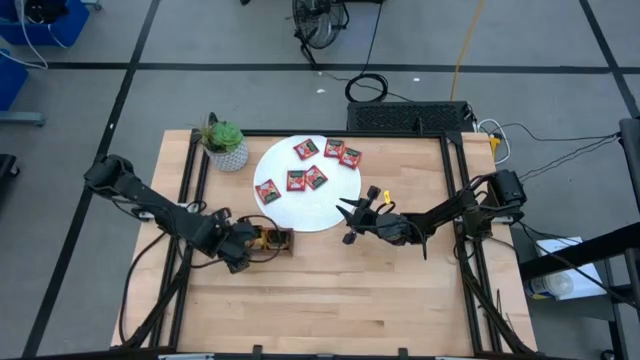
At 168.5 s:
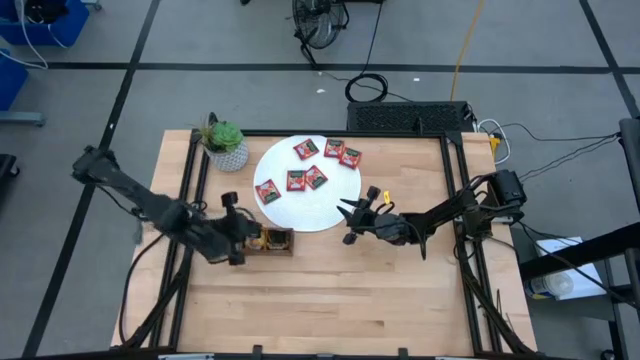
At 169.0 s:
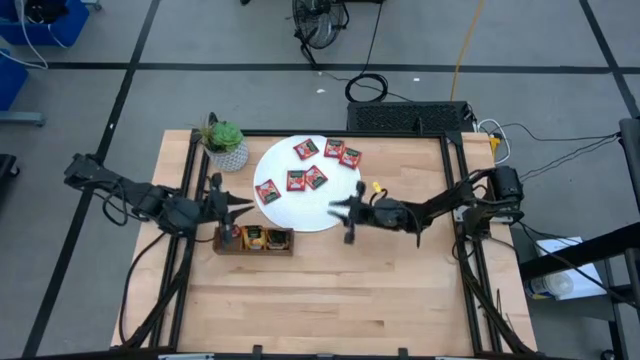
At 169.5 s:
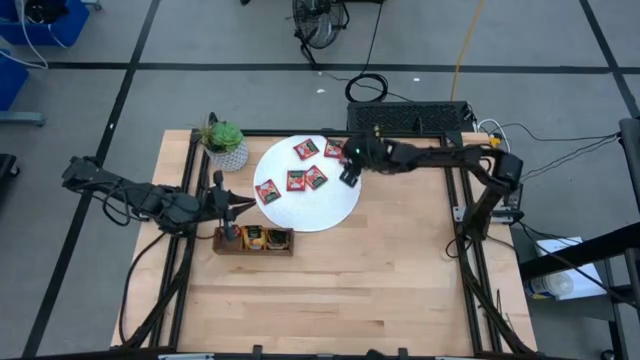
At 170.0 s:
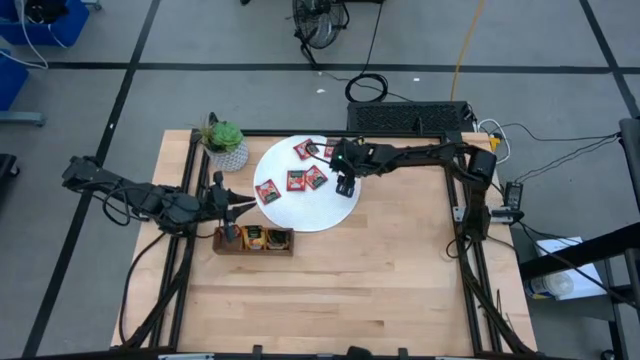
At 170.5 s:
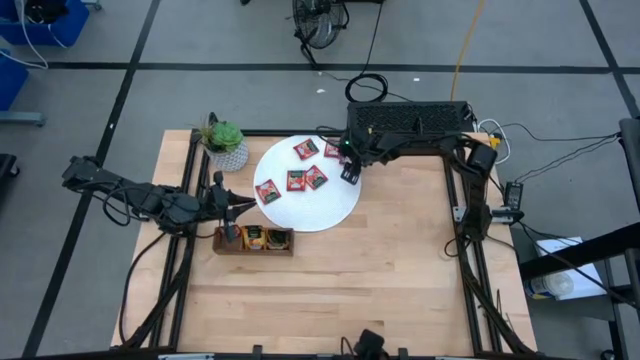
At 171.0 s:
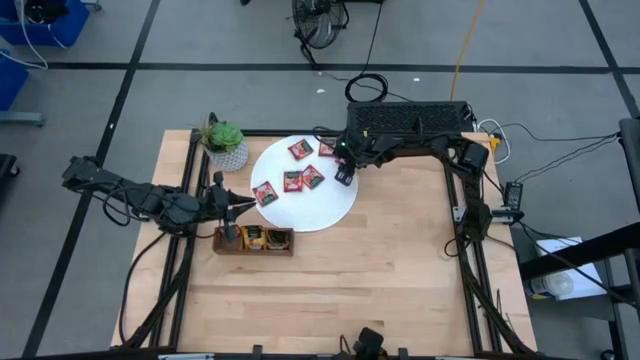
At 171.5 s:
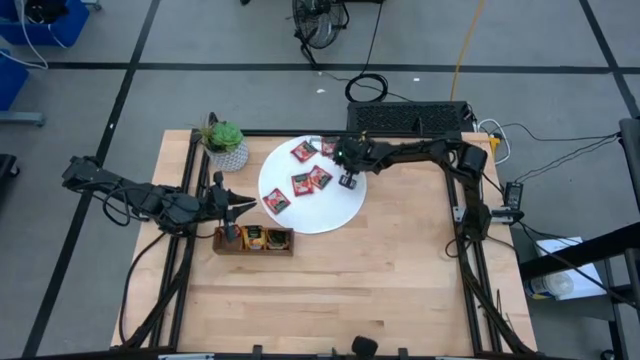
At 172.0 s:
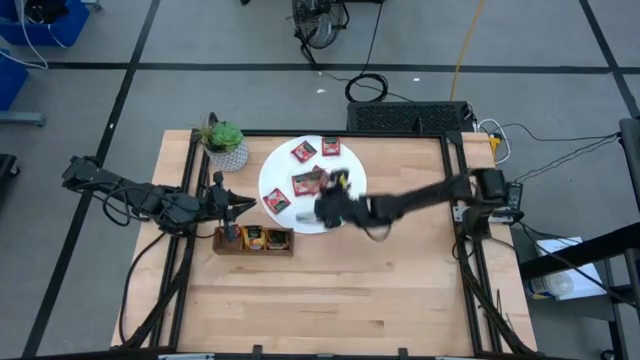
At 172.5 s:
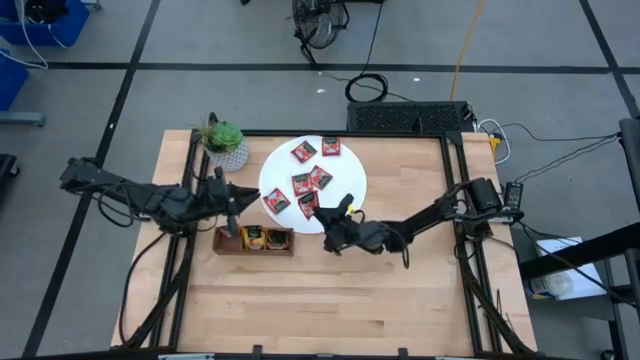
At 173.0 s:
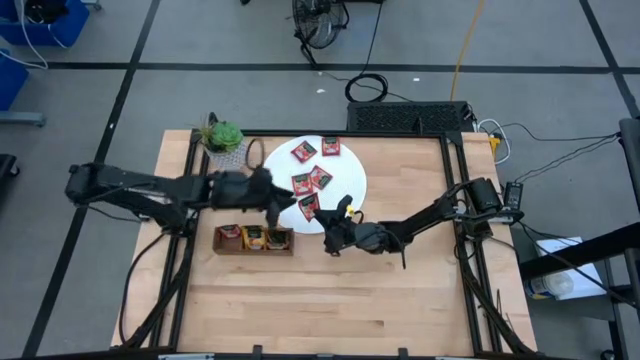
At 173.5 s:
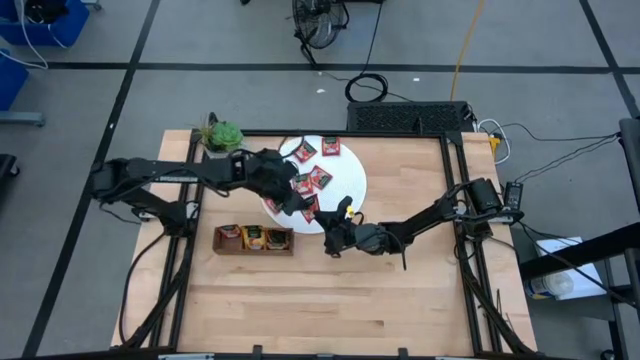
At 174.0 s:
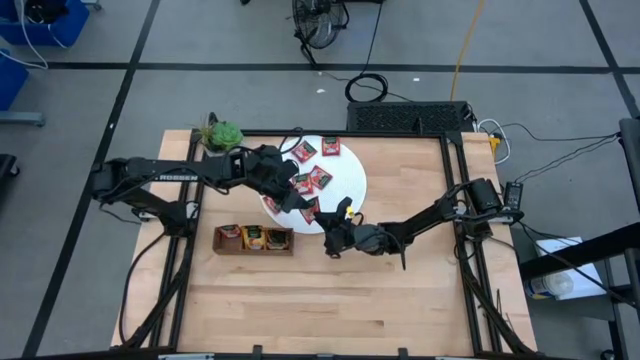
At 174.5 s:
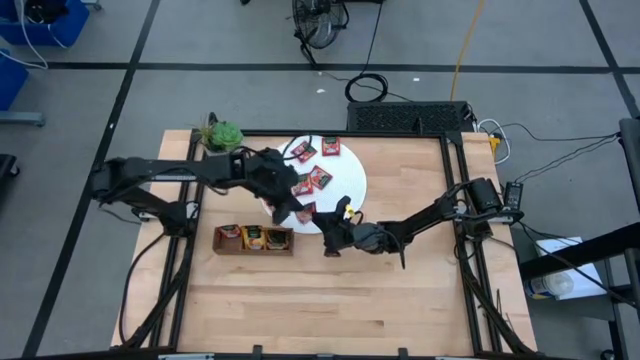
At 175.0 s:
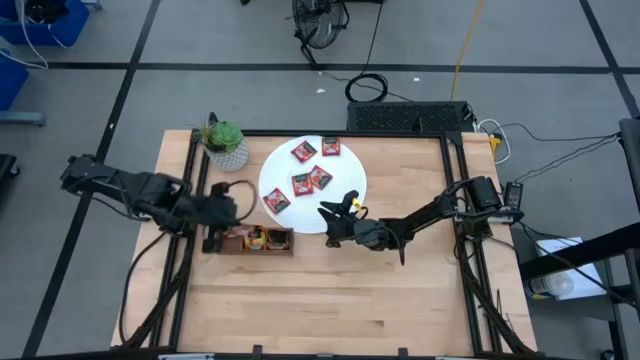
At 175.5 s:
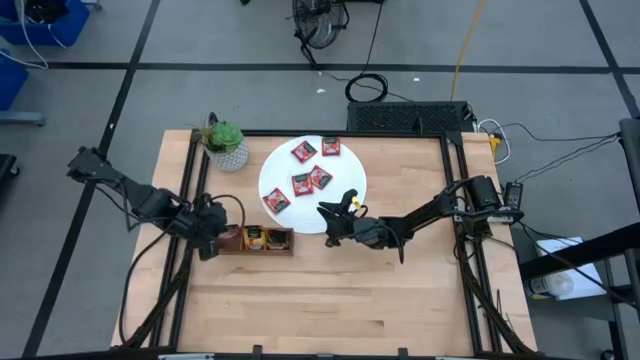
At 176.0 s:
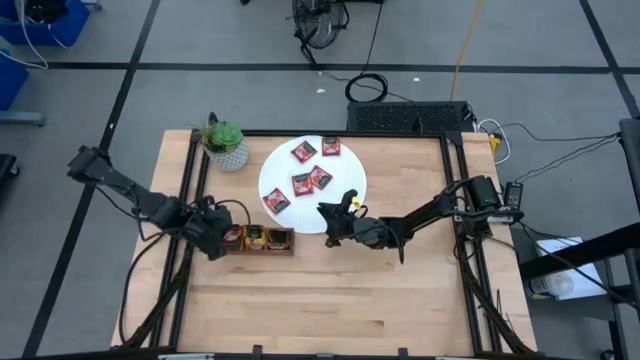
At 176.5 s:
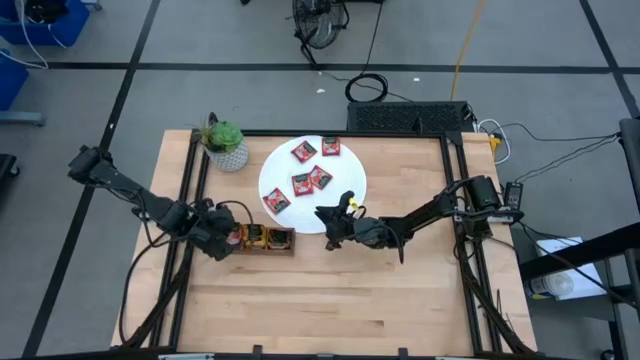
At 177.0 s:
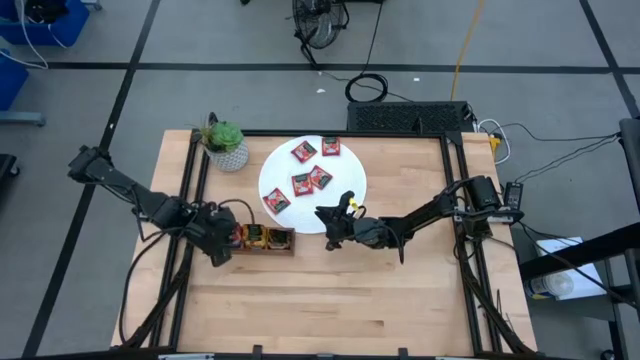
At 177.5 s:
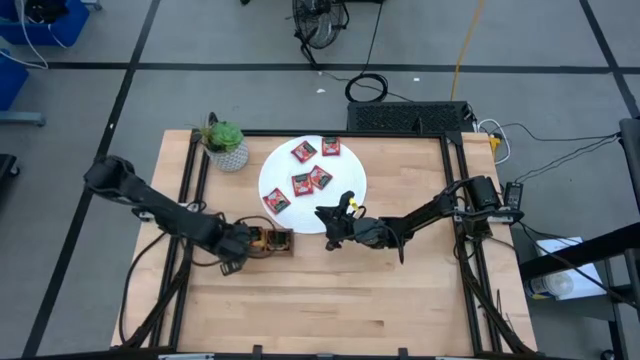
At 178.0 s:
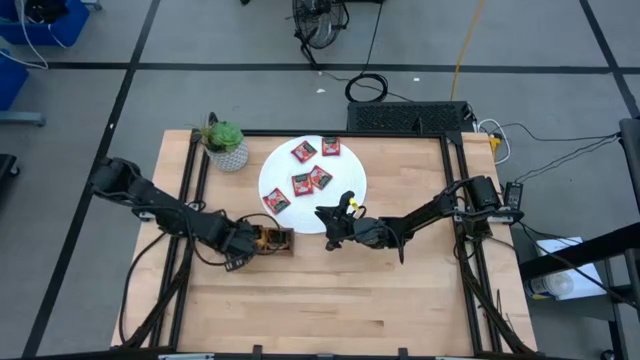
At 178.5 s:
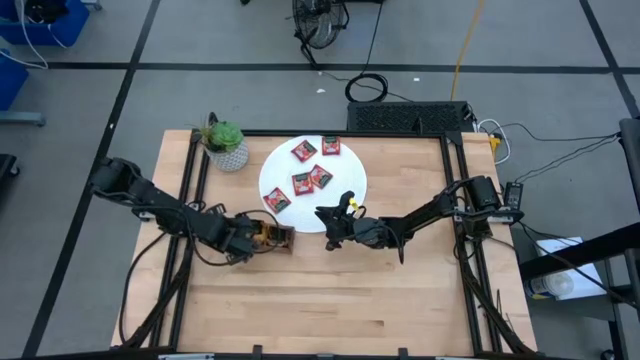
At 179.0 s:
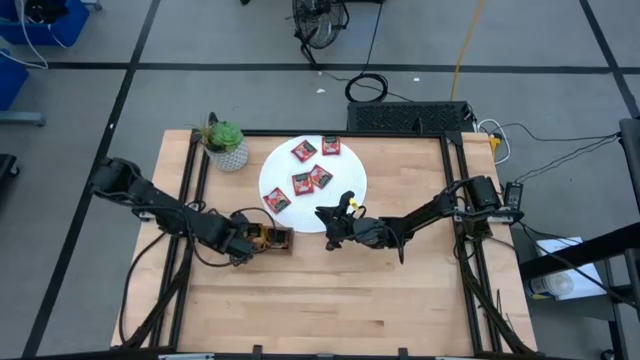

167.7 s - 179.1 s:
Task: Pick & Place Tea
Put the red tea bag into the left section of the wooden organizer

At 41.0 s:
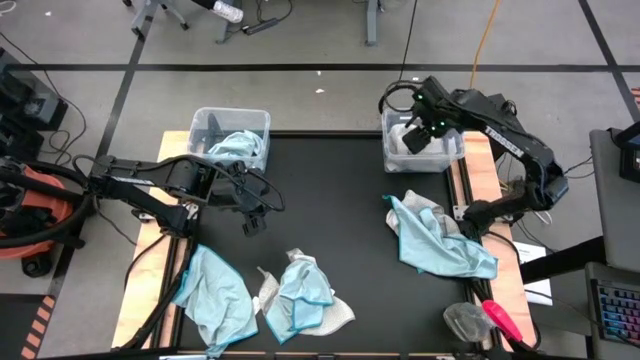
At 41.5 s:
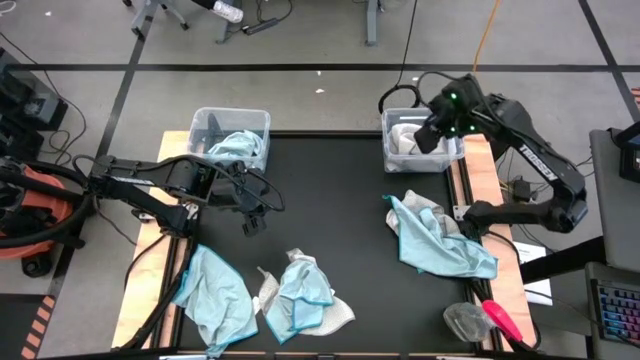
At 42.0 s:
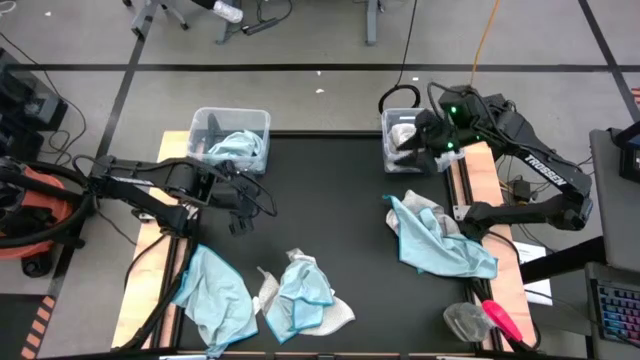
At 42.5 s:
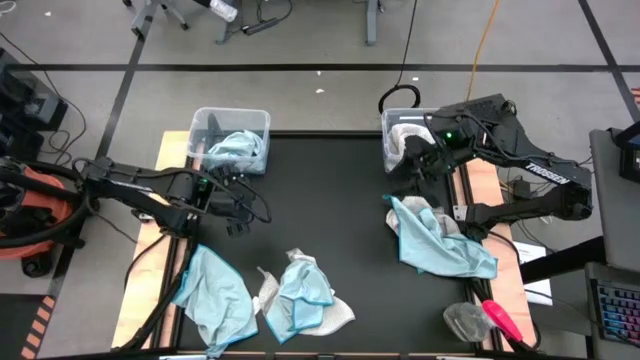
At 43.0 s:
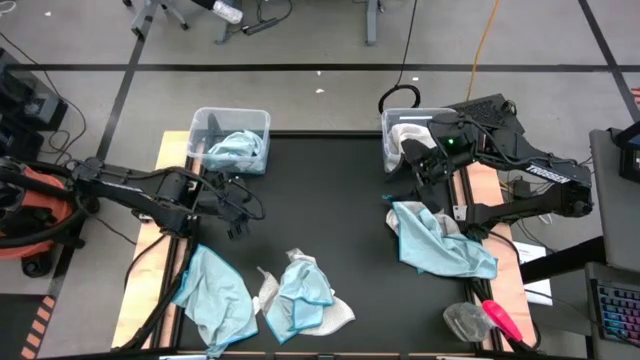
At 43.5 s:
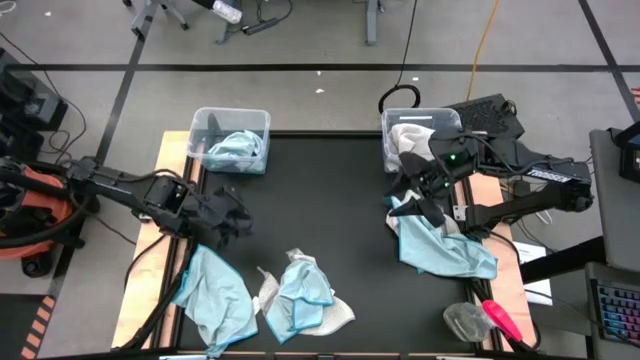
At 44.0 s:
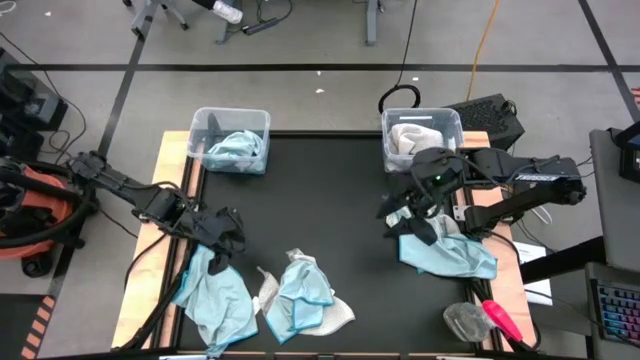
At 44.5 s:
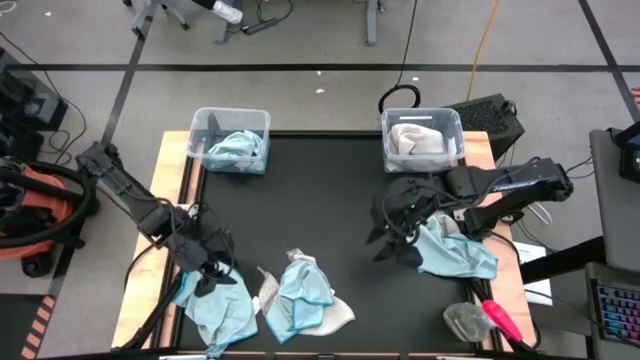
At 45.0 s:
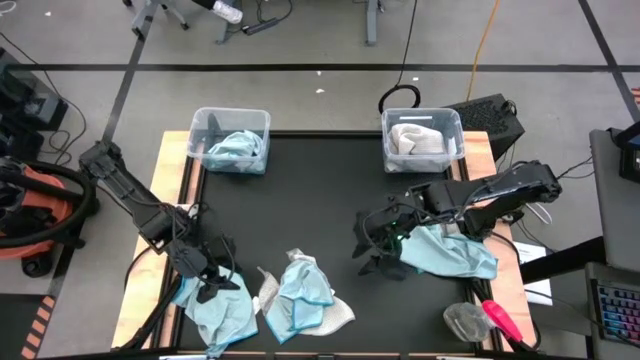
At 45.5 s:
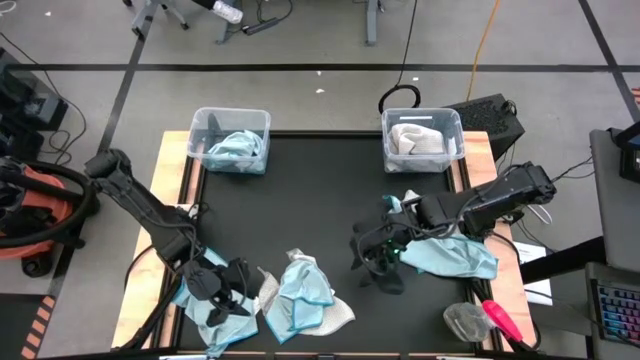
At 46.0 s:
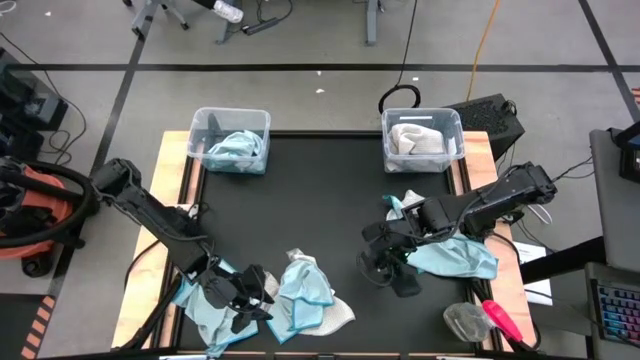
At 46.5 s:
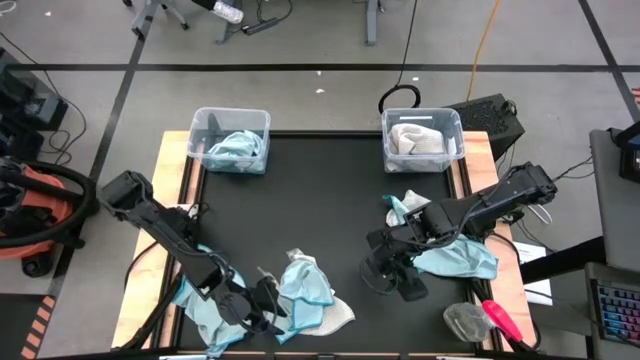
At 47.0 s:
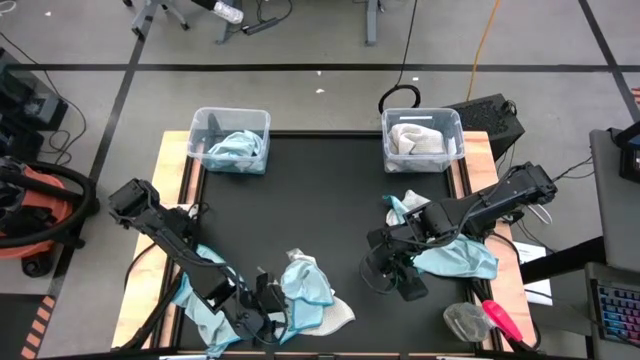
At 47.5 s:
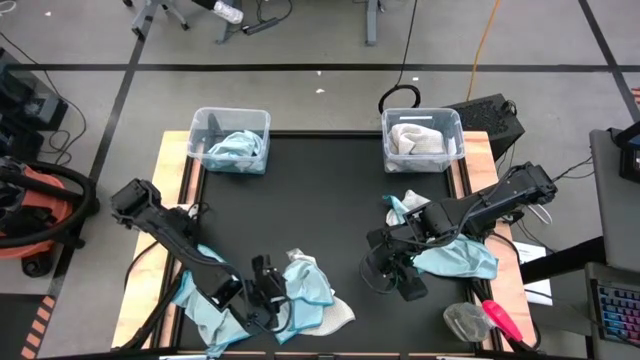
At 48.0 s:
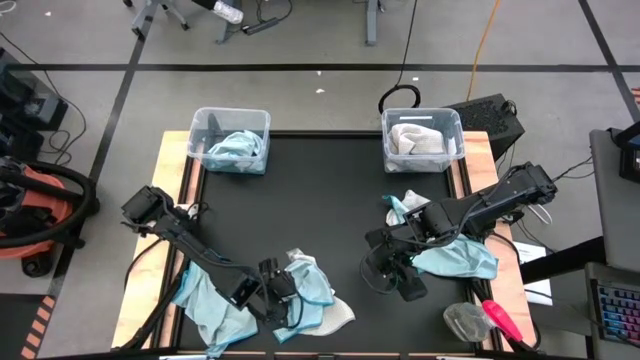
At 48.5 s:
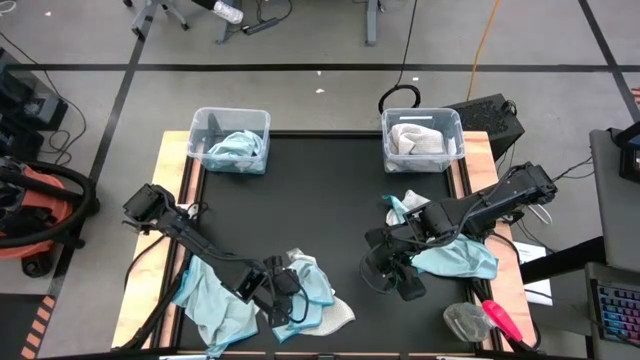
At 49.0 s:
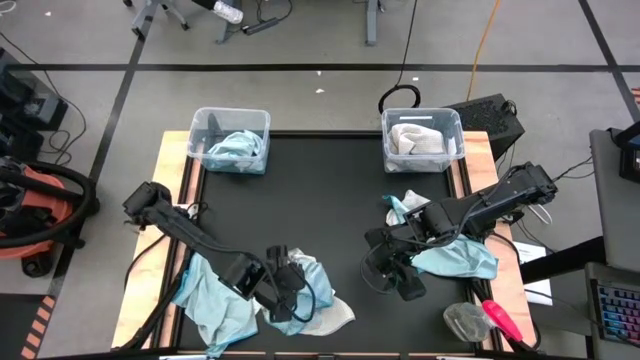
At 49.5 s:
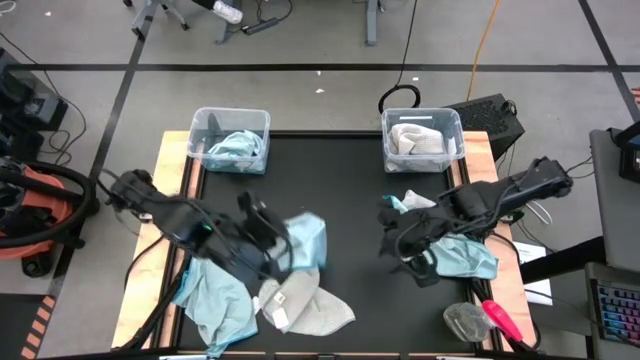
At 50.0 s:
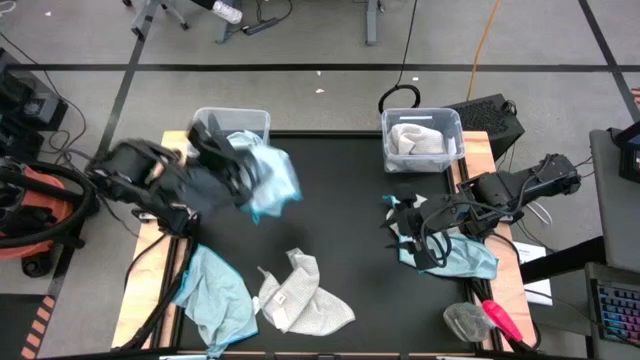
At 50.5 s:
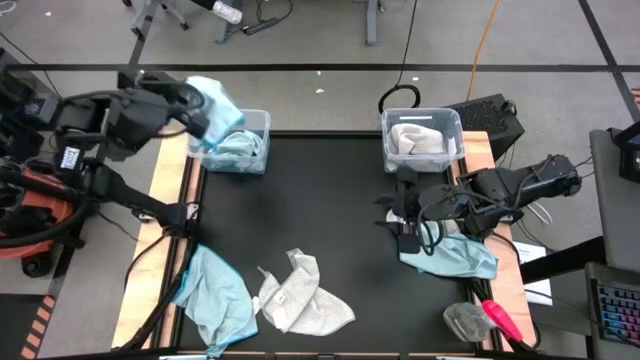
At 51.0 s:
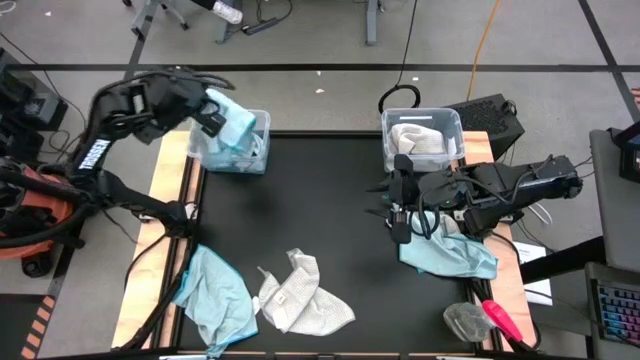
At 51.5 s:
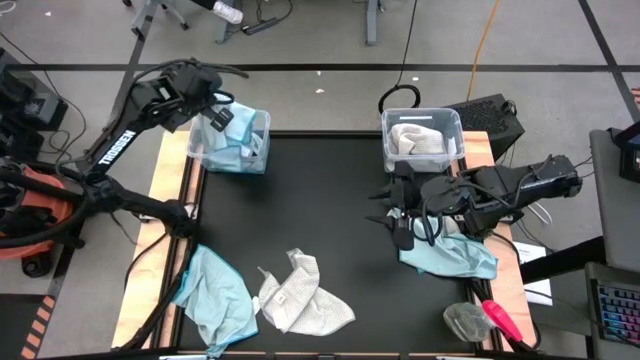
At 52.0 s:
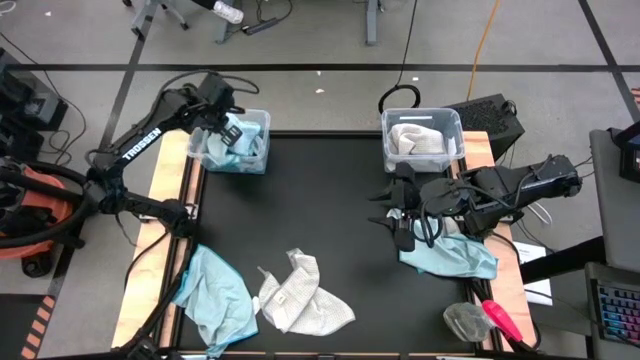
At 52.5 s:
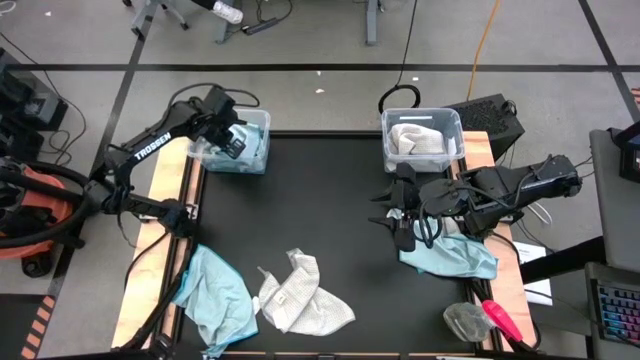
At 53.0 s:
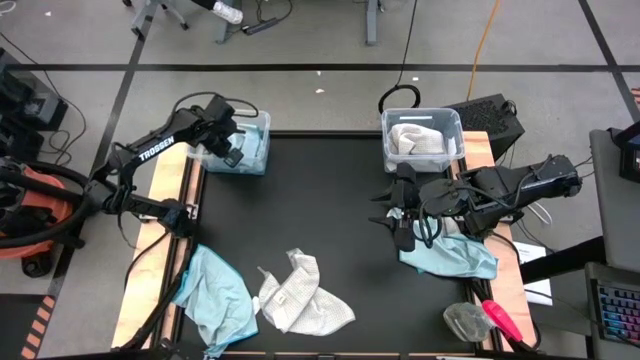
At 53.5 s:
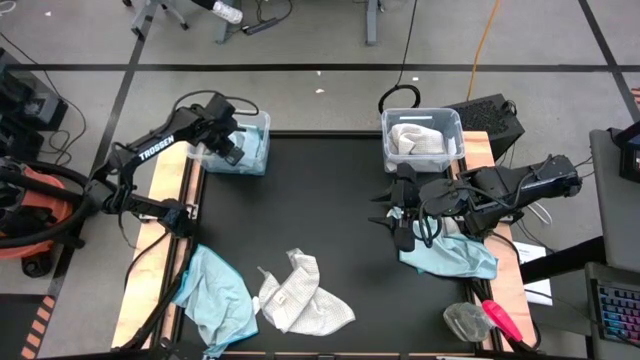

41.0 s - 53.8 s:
Task: Sort microfiber towel by color & place in baskets
Put the blue towel into the left transparent bin
